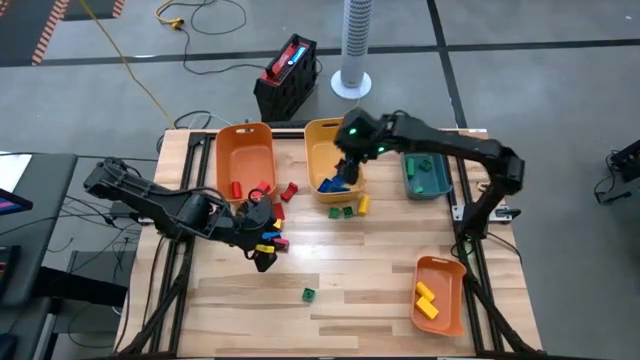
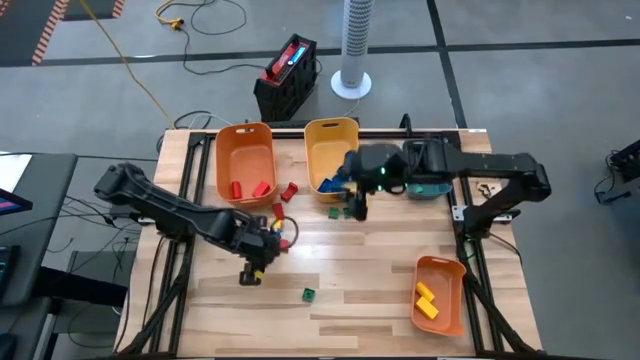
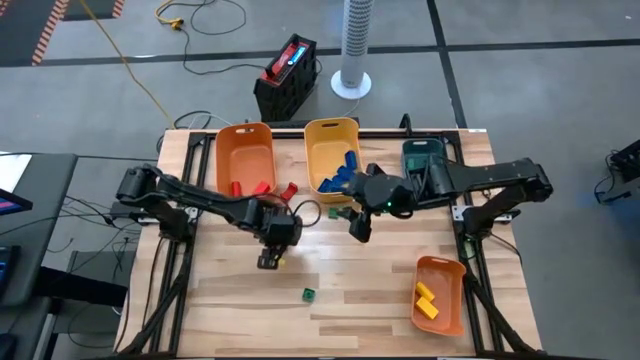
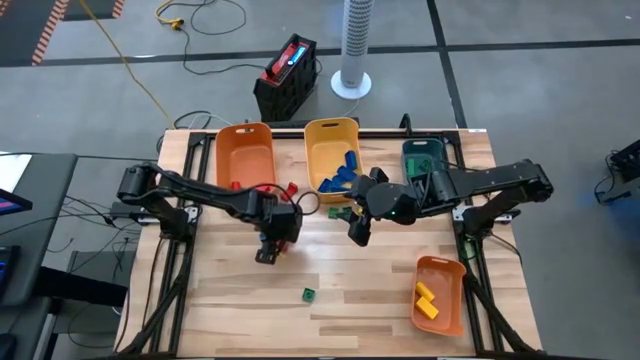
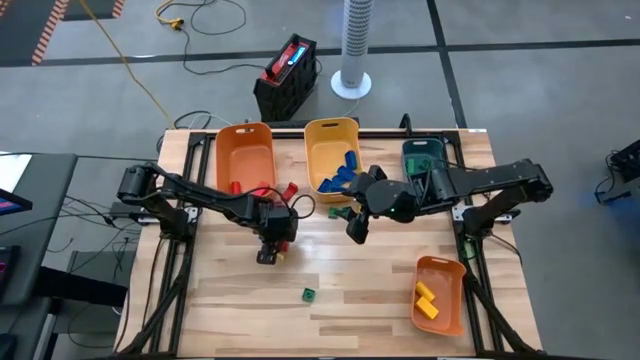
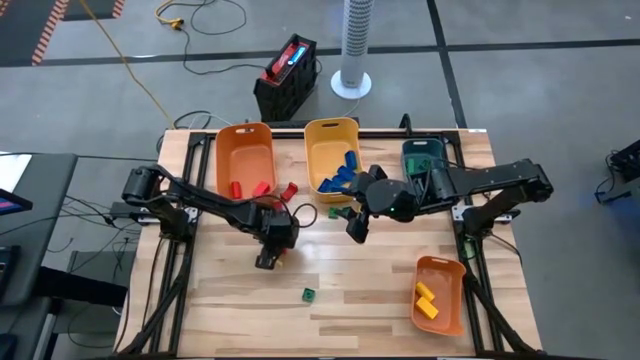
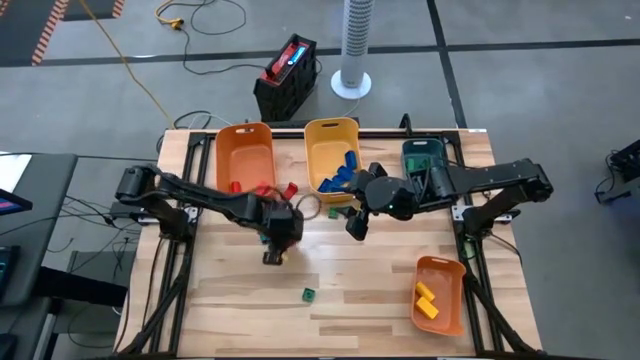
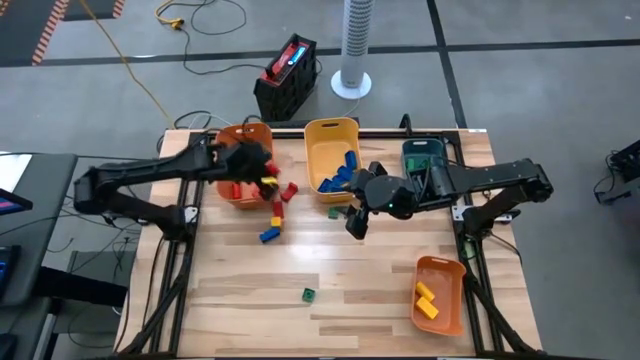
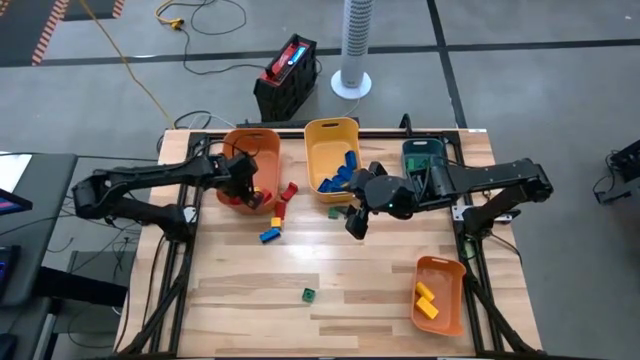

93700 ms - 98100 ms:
Task: Sort blocks
Put the red block into the top orange bin

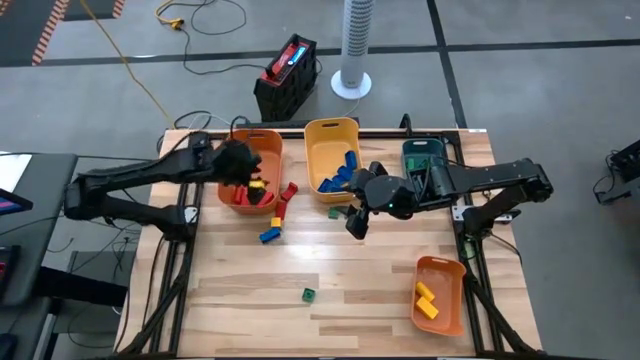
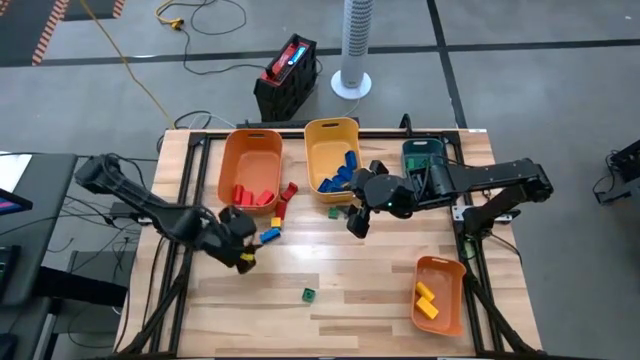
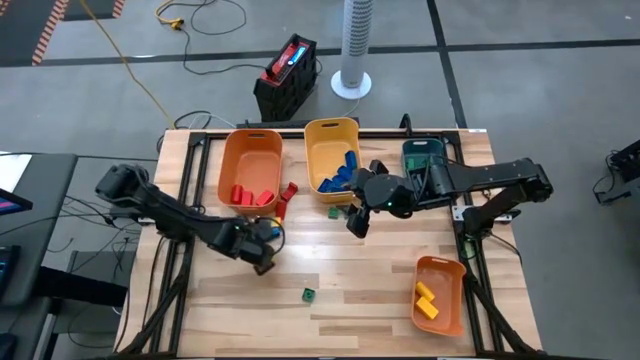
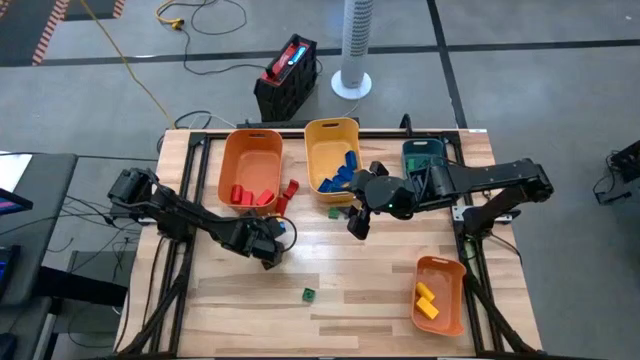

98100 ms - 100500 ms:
Put the blue game piece into the yellow bin

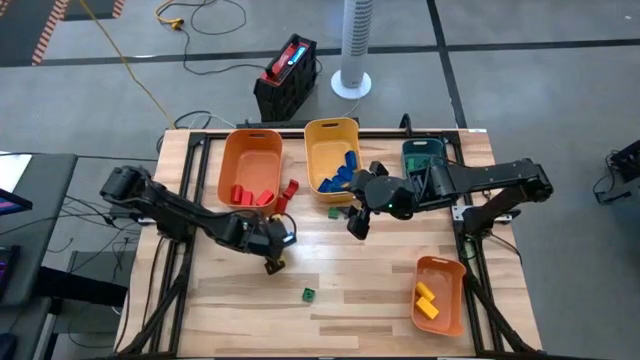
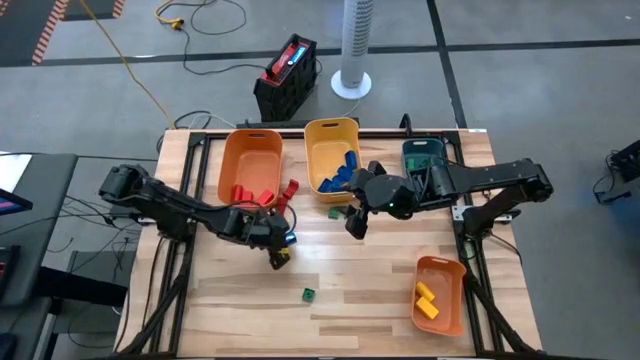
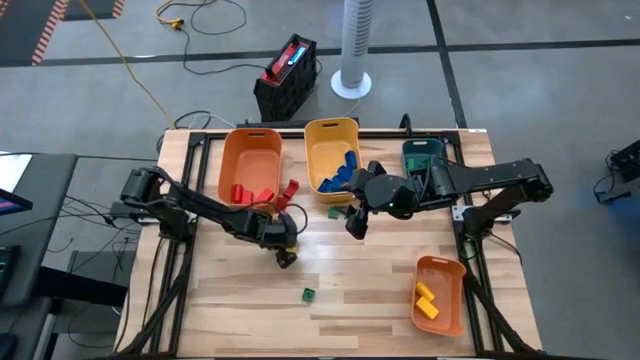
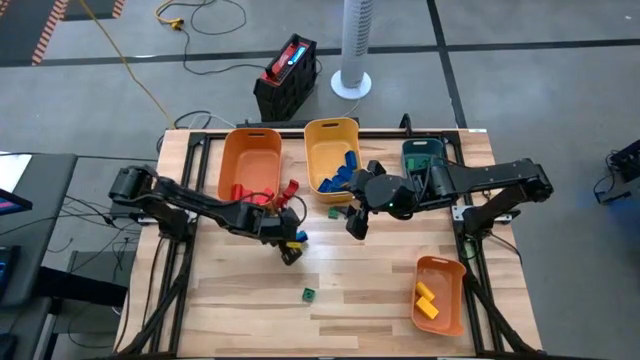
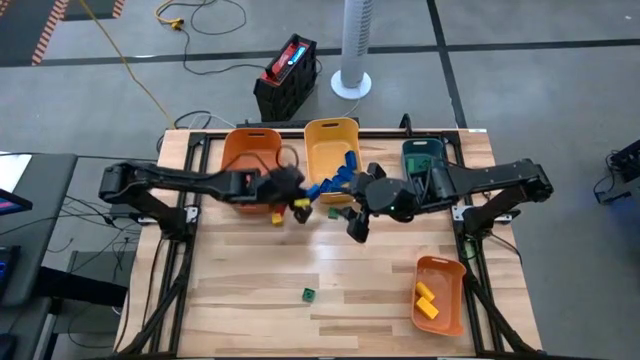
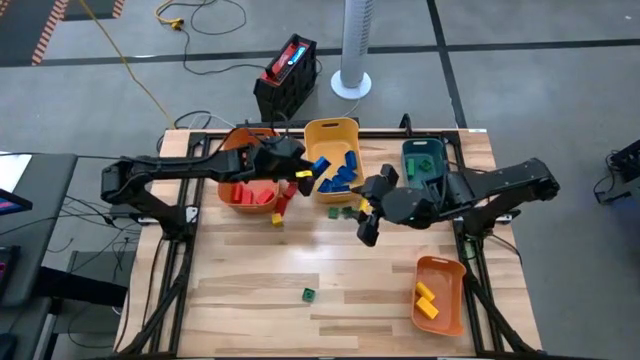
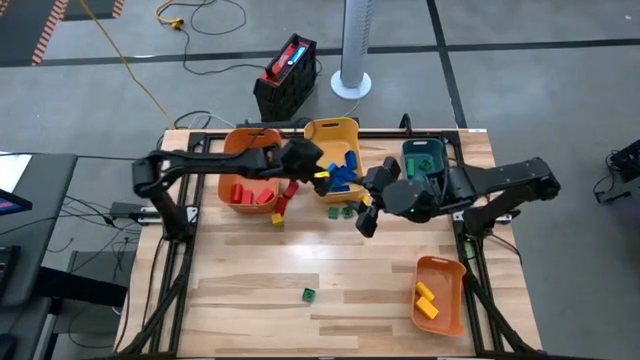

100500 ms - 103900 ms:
Put the blue game piece into the yellow bin

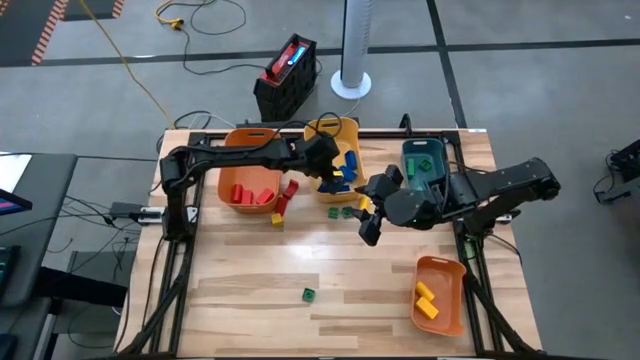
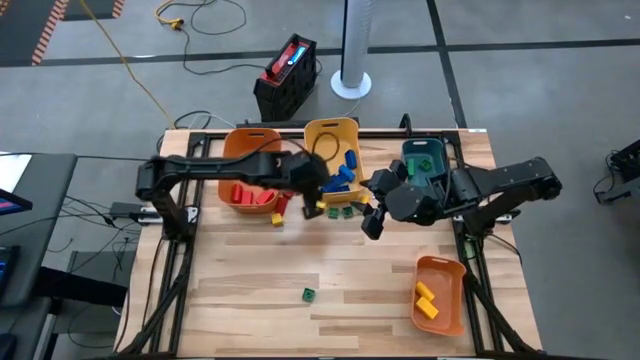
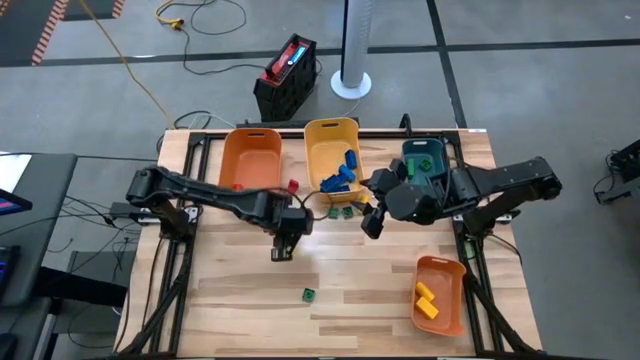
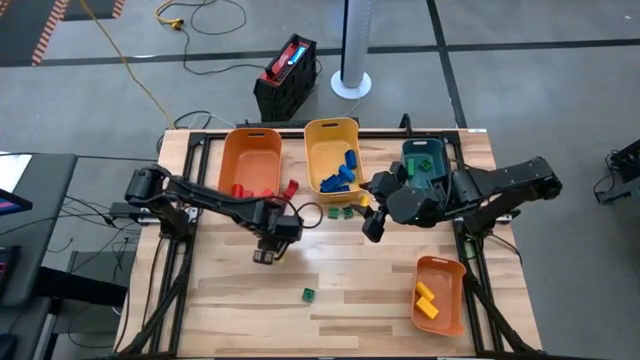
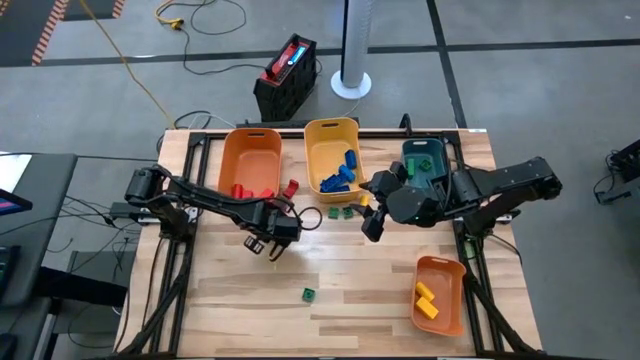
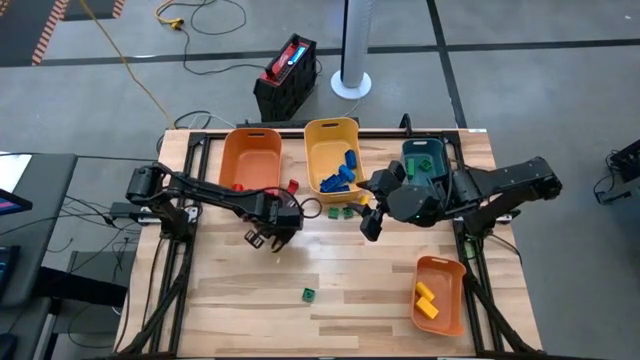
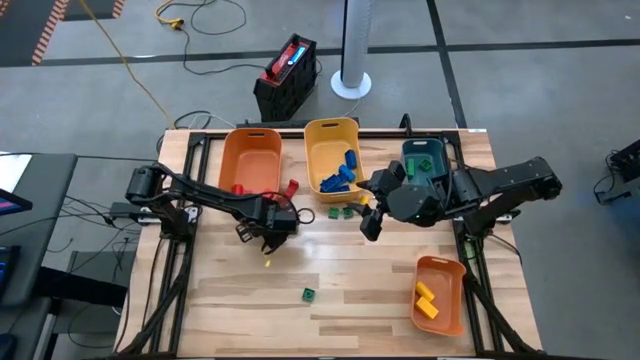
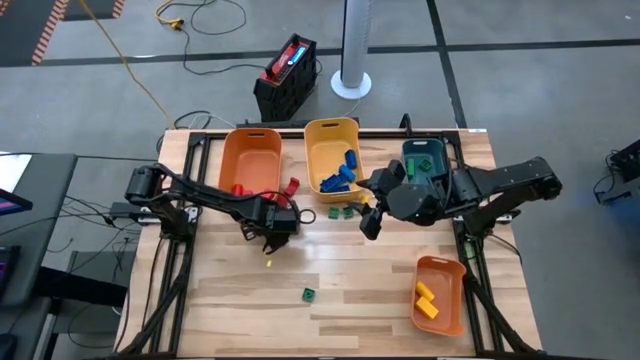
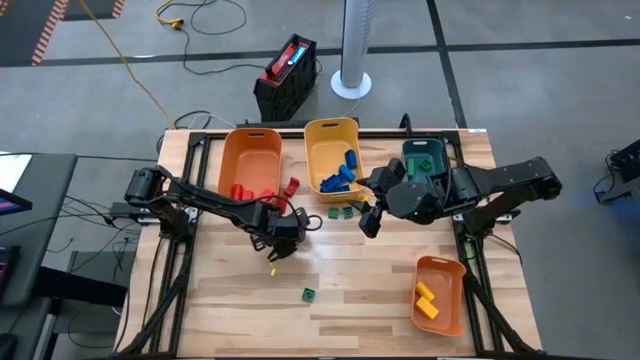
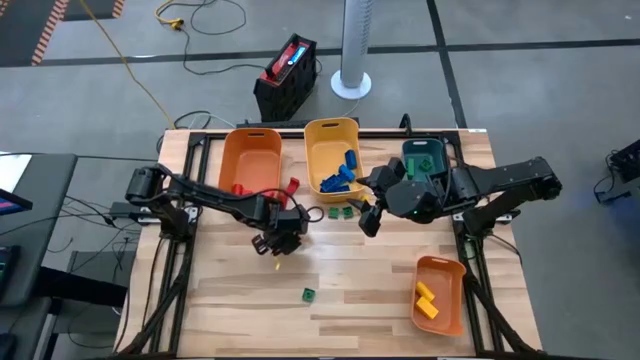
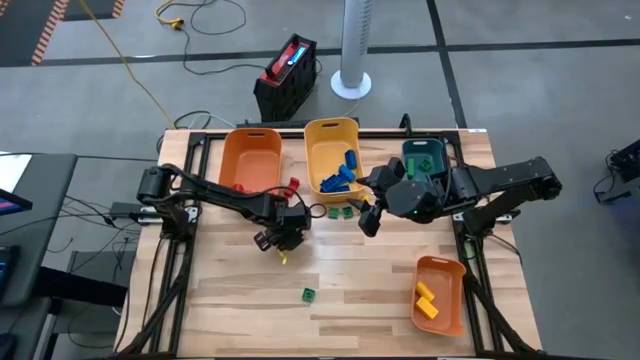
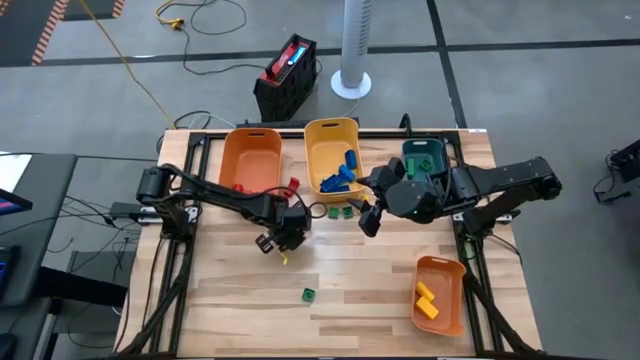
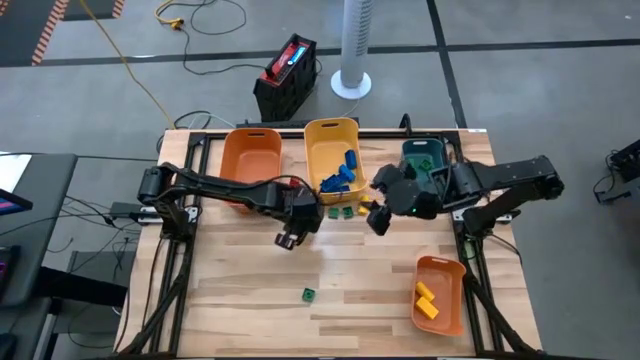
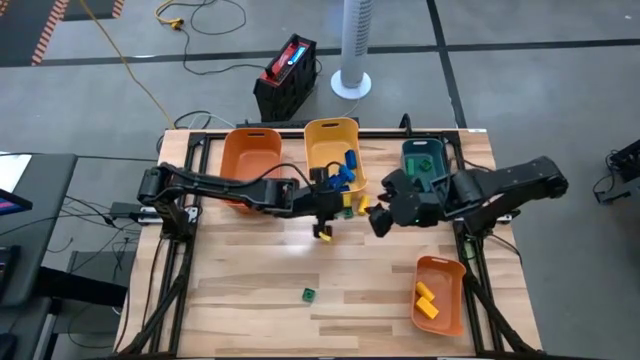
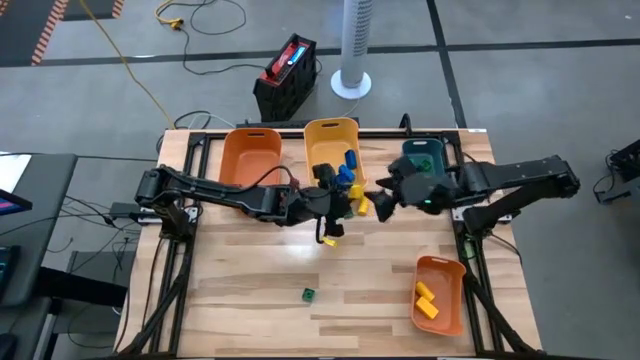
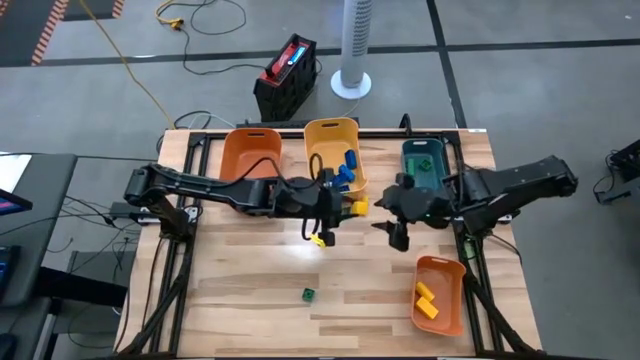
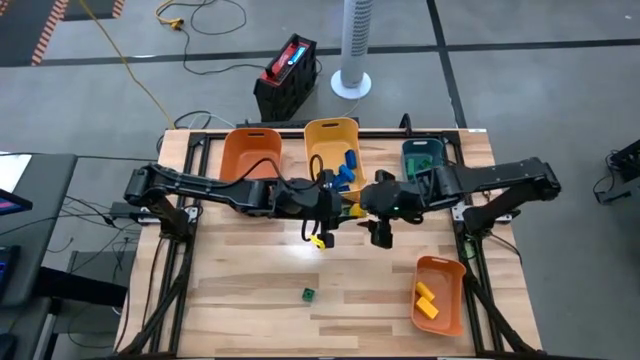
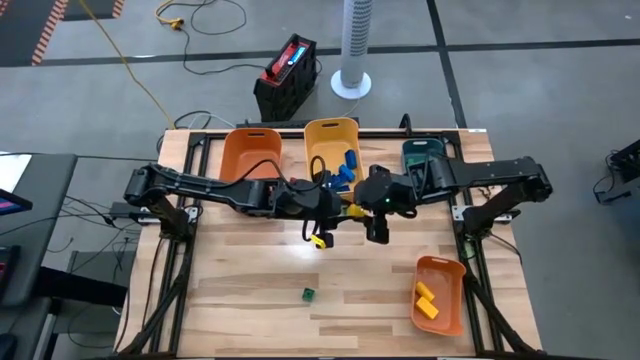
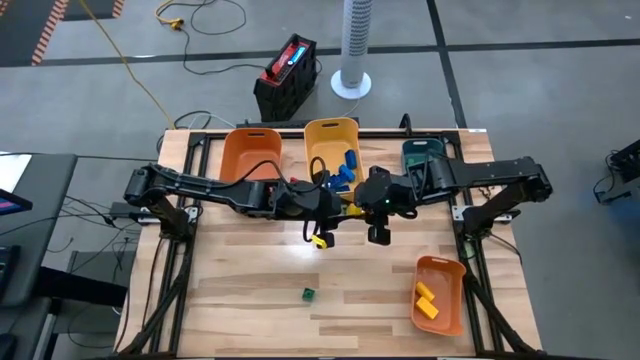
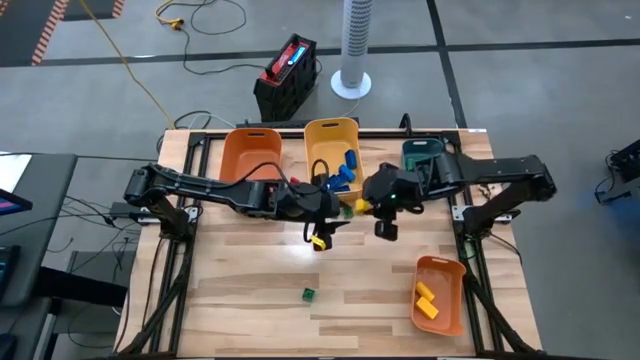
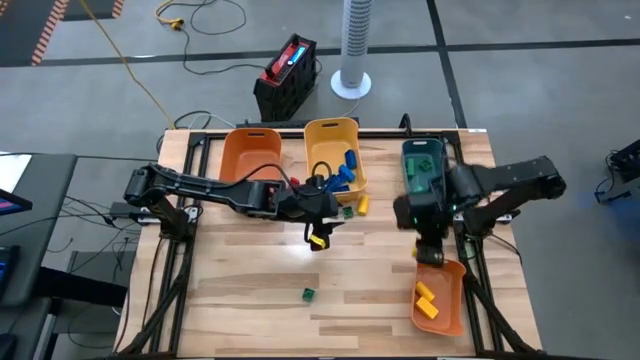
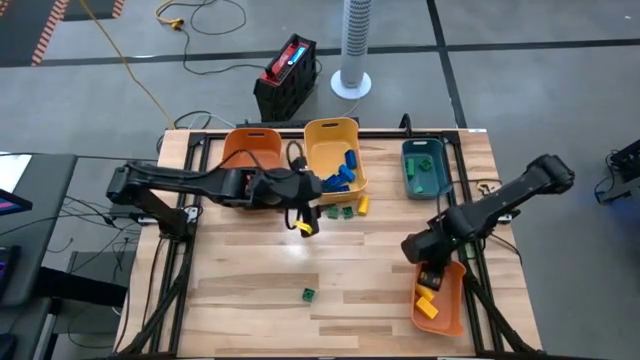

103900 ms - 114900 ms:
Put the yellow block into the bottom orange bin
